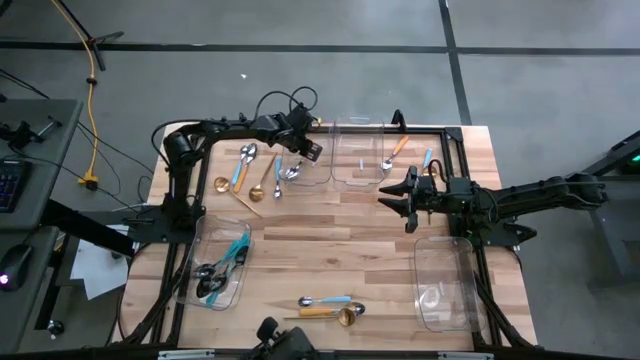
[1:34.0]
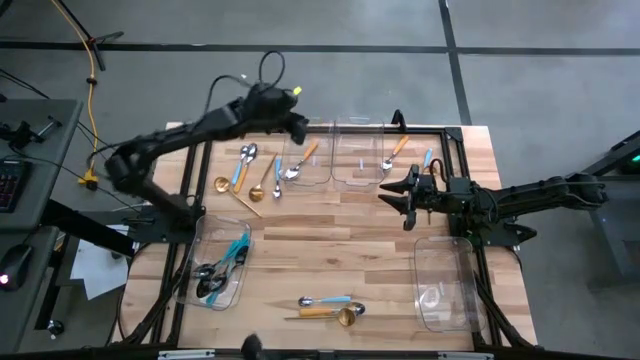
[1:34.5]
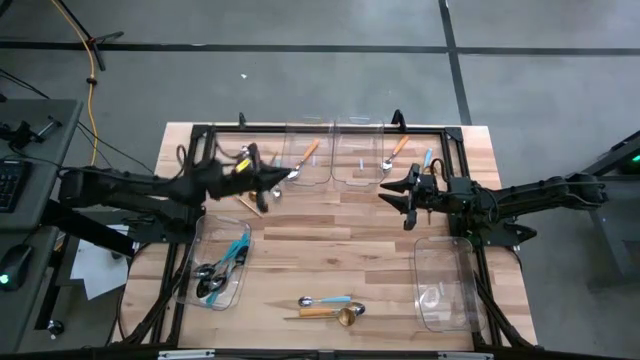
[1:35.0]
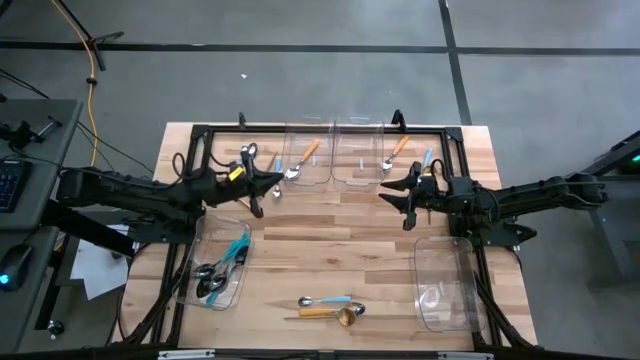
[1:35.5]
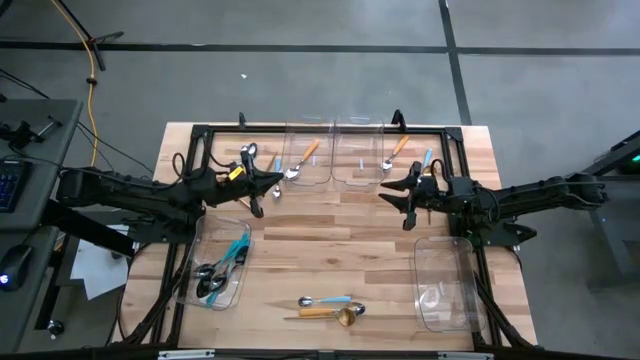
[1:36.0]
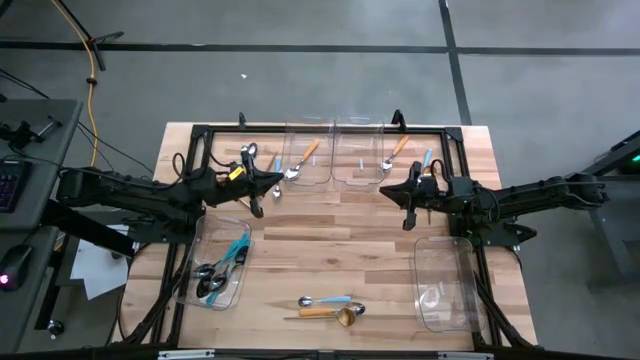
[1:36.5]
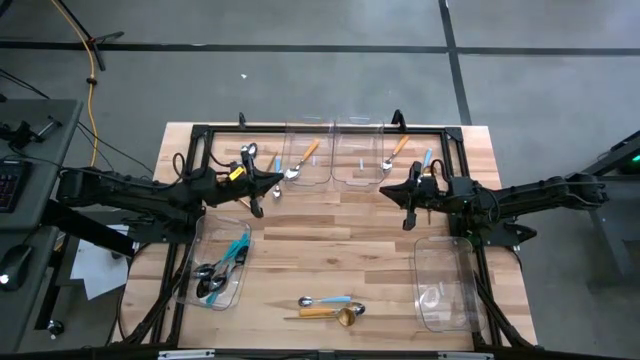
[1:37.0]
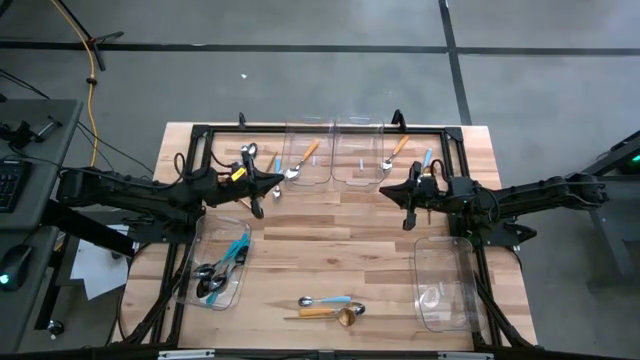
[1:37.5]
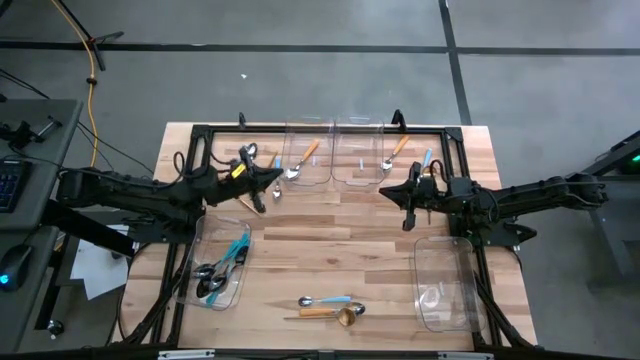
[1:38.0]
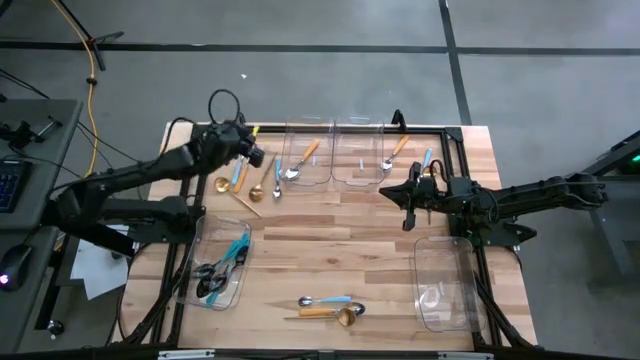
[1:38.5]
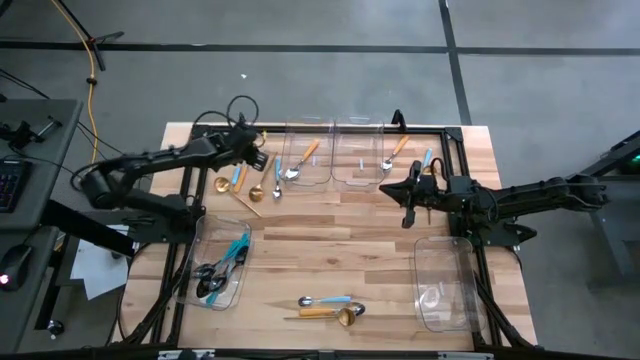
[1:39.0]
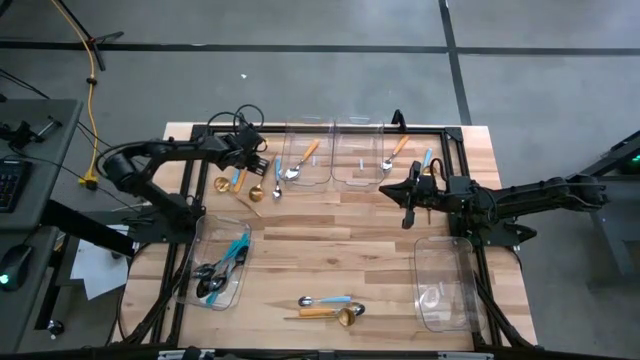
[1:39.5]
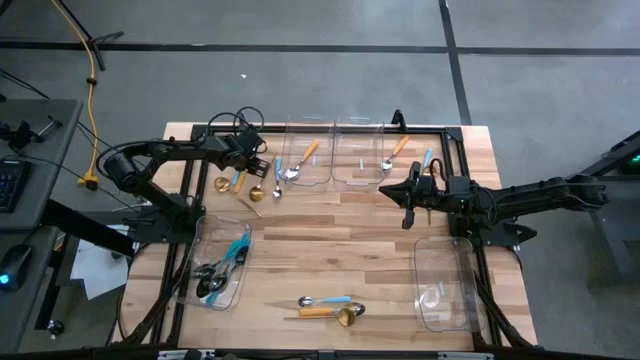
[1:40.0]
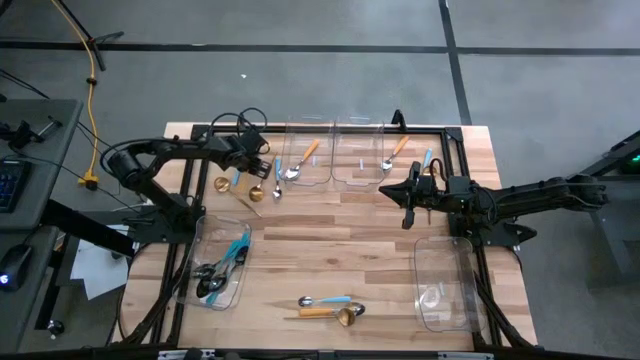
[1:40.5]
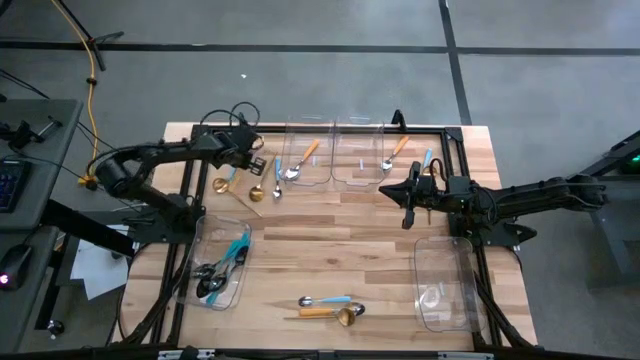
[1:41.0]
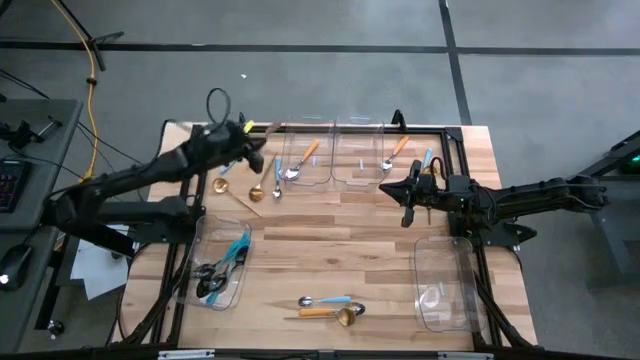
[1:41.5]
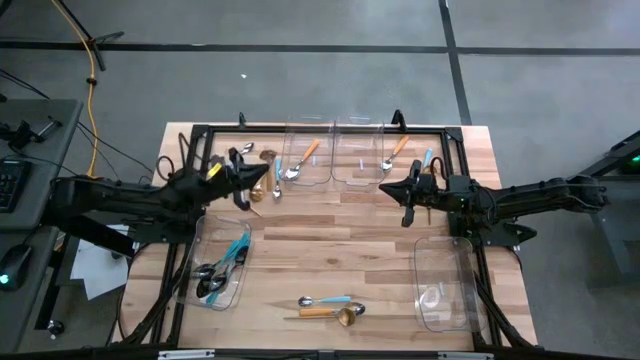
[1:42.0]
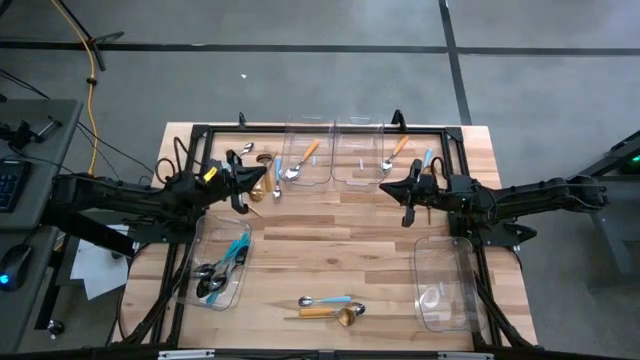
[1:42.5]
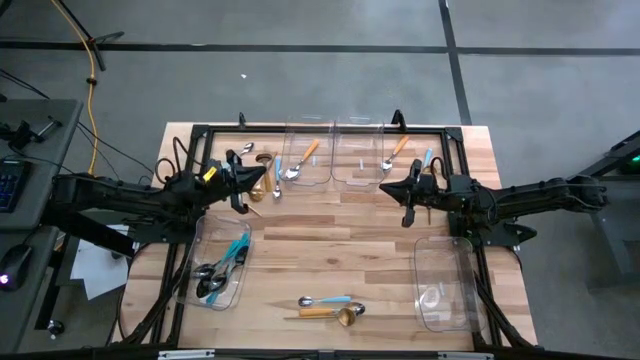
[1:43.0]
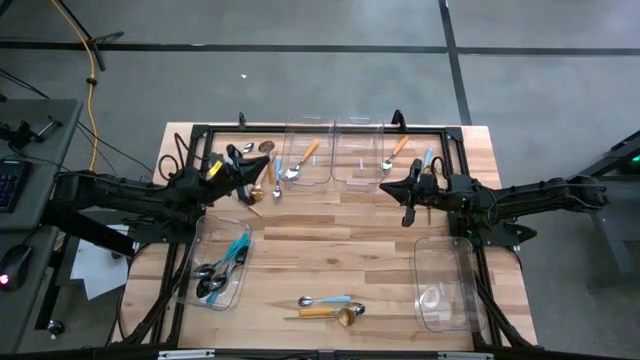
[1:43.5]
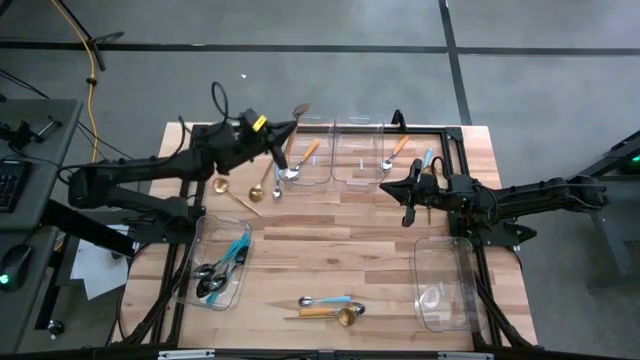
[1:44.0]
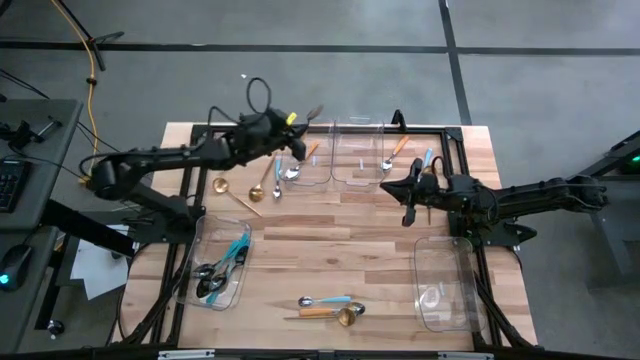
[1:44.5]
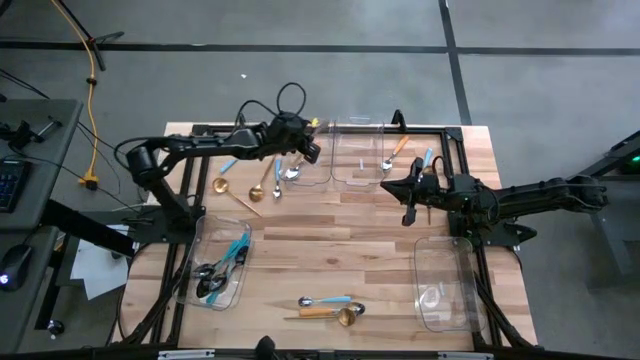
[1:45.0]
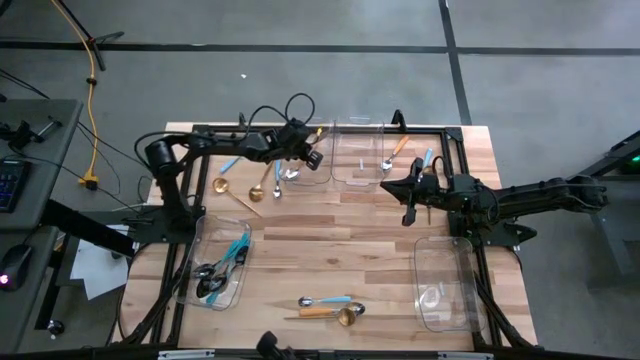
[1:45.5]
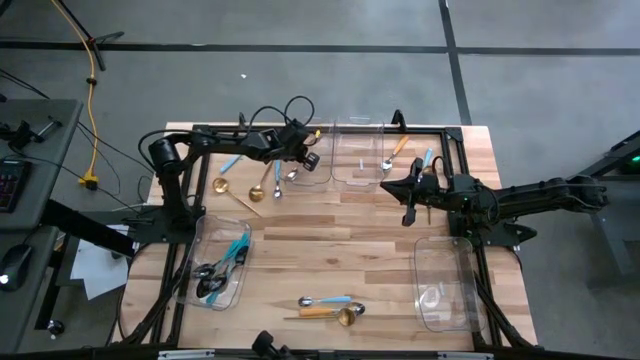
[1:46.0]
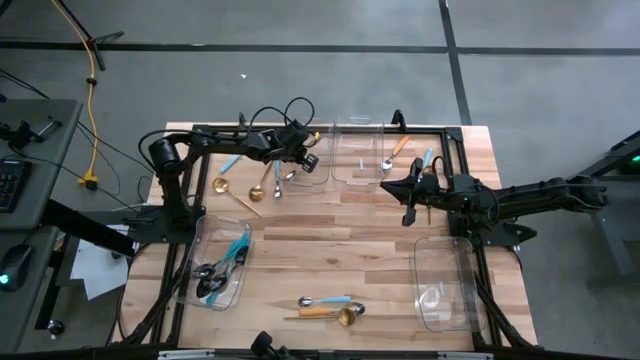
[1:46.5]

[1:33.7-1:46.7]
Task: Sort silverware by color (type)
Put the yellow spoon into the top left transparent bin
